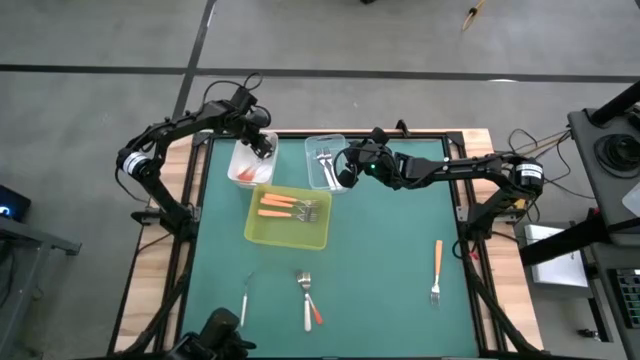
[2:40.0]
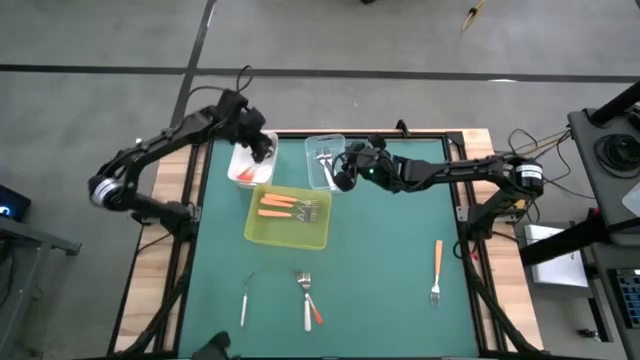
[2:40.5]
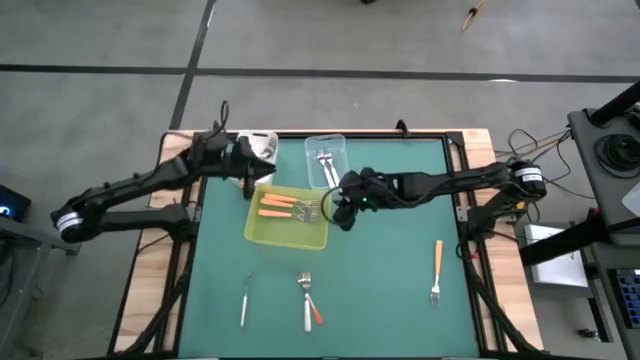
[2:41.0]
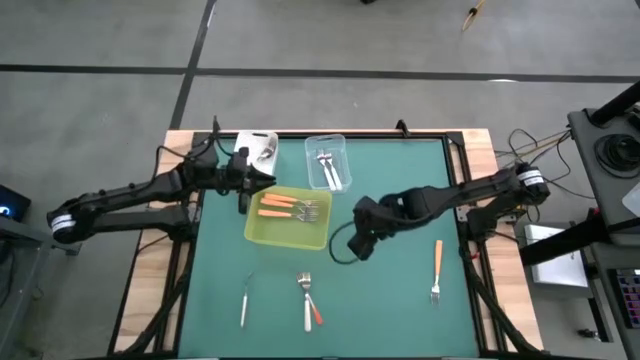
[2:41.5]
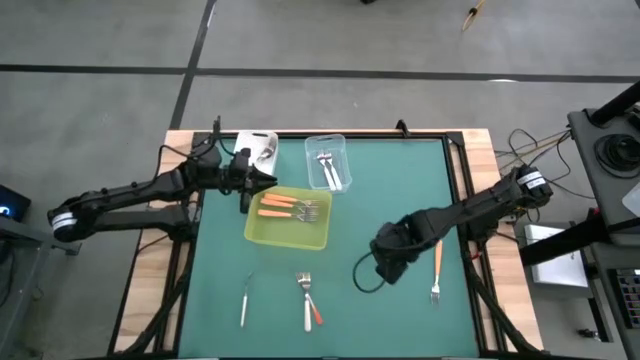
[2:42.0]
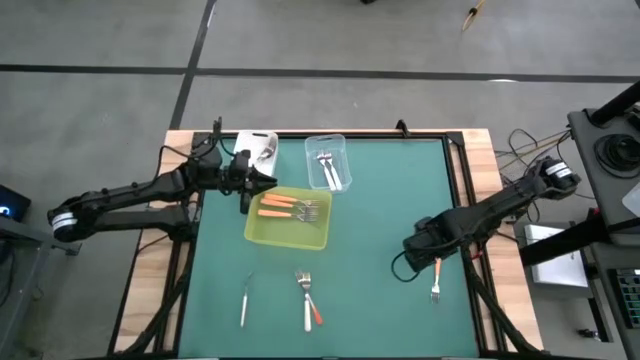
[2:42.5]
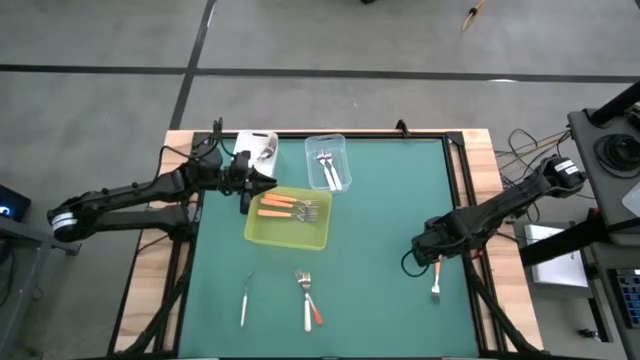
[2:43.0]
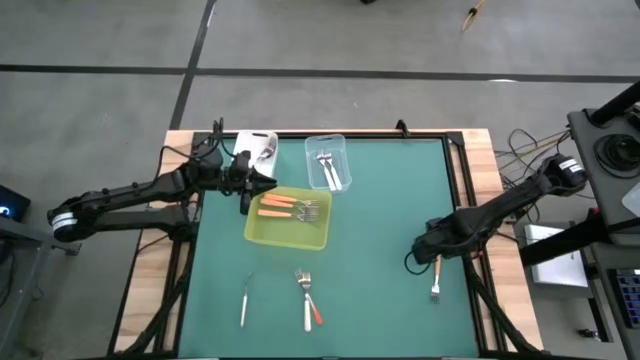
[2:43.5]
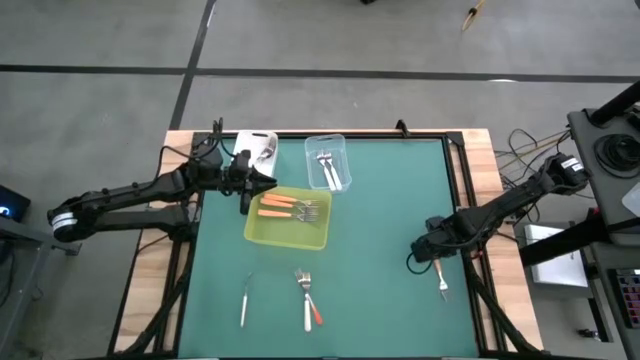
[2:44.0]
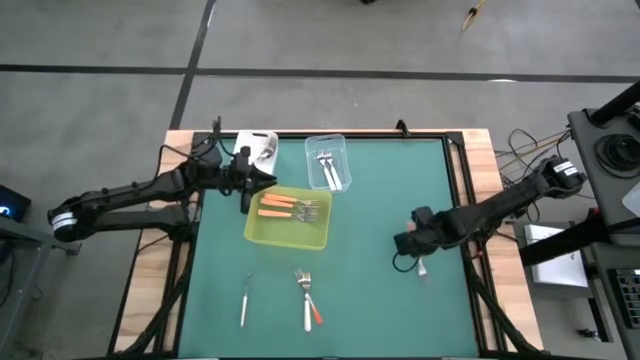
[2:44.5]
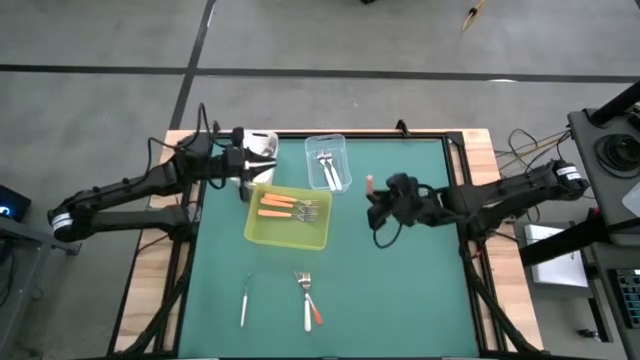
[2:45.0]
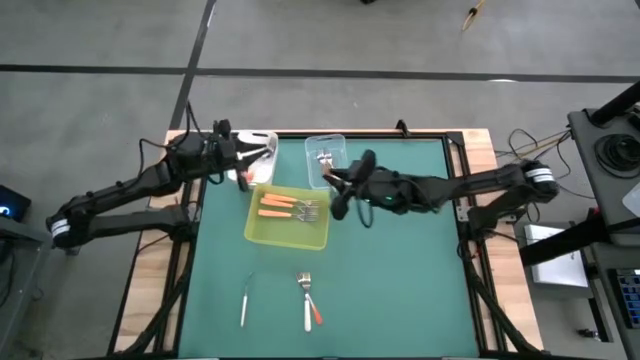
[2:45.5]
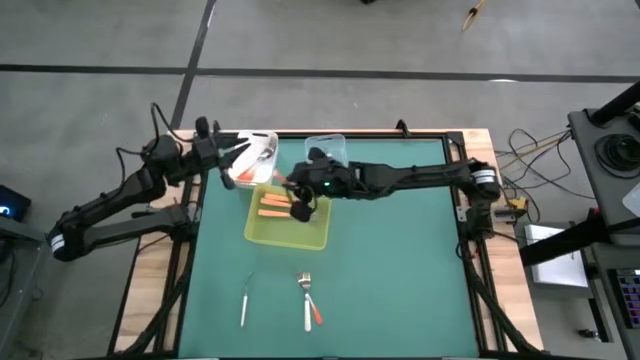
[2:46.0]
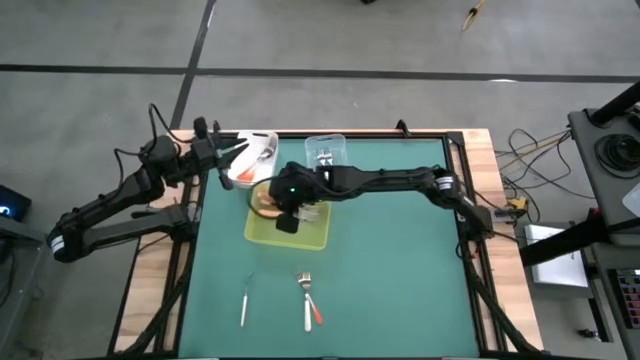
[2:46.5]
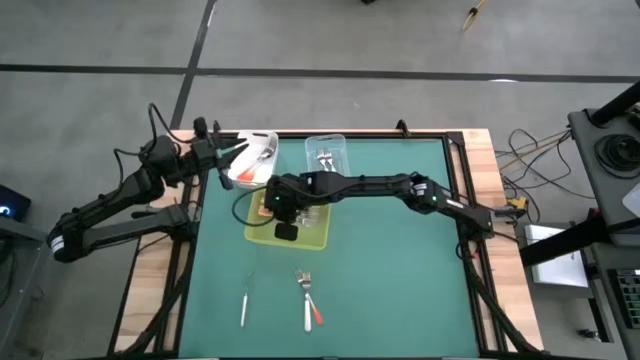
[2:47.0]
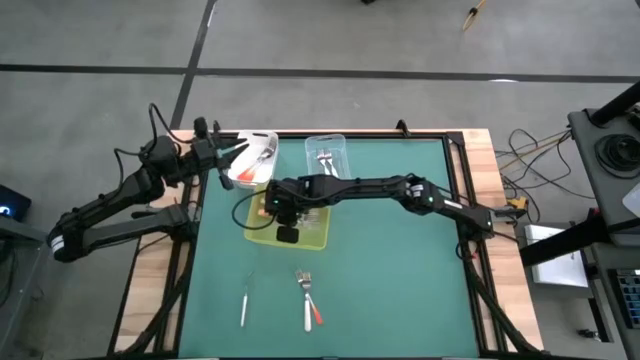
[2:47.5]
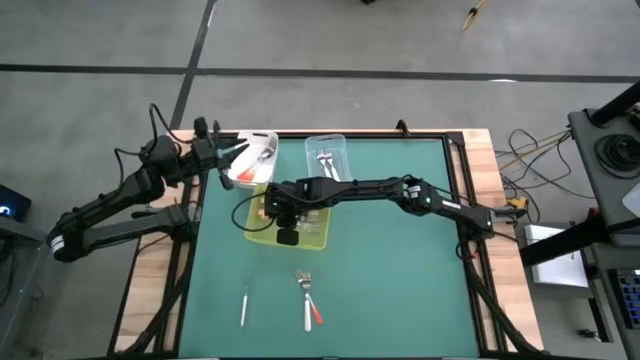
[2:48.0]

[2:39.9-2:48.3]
Task: Sort silverware by color (type)
Put the yellow fork into the yellow bin

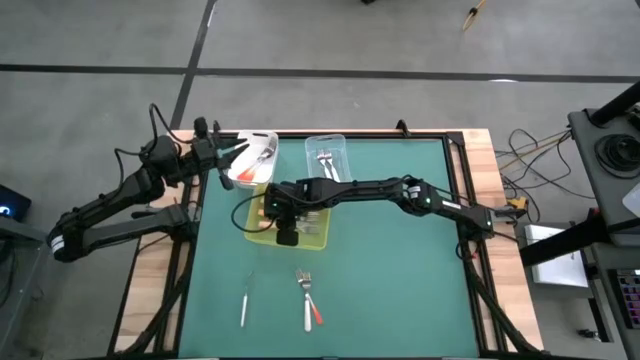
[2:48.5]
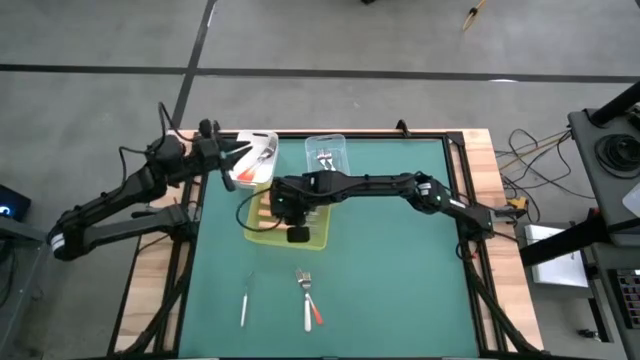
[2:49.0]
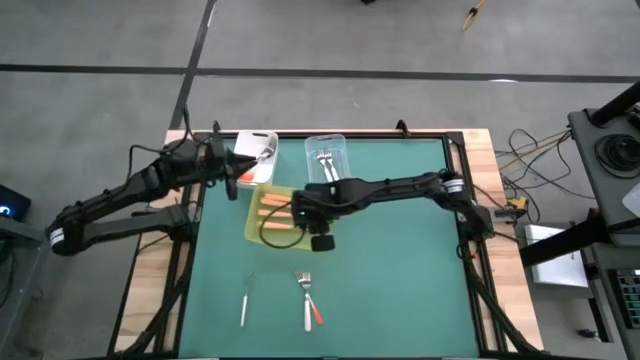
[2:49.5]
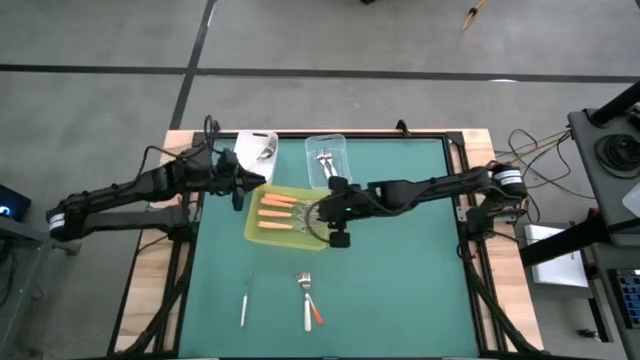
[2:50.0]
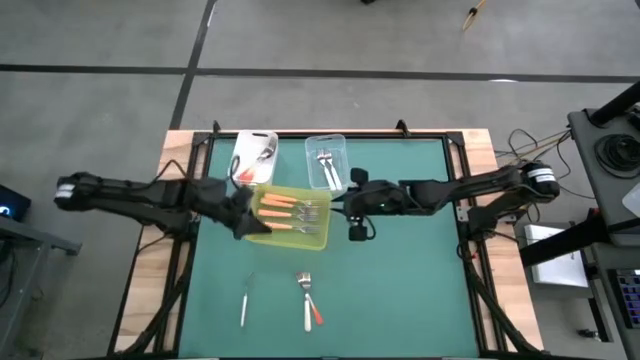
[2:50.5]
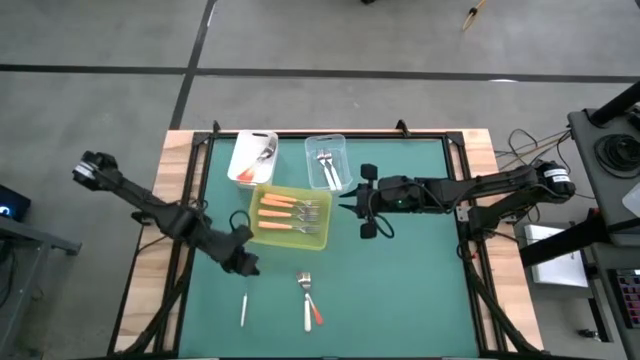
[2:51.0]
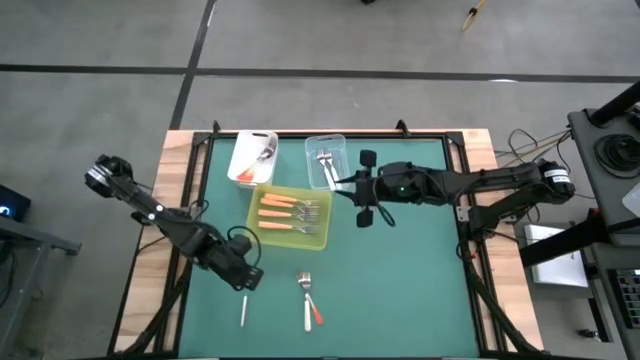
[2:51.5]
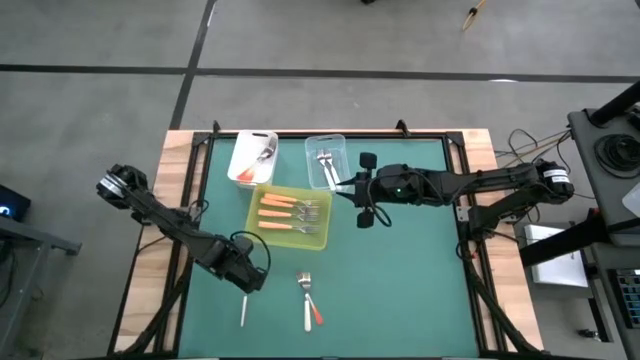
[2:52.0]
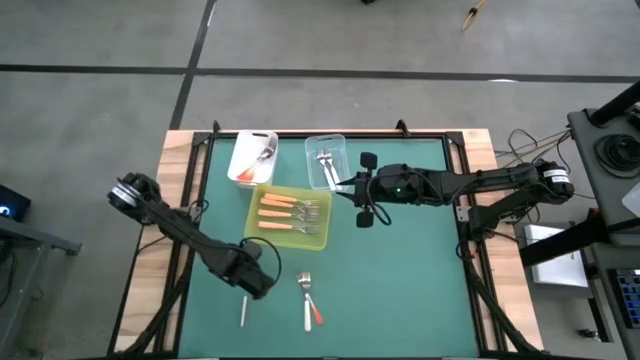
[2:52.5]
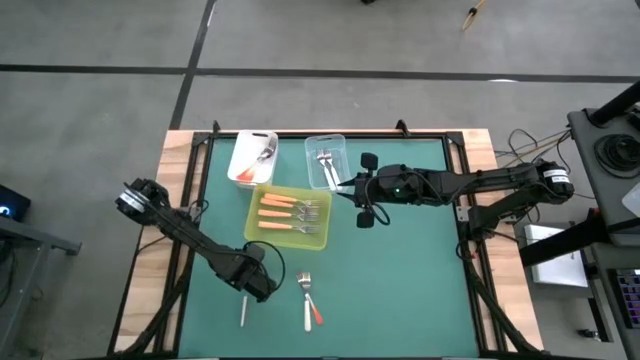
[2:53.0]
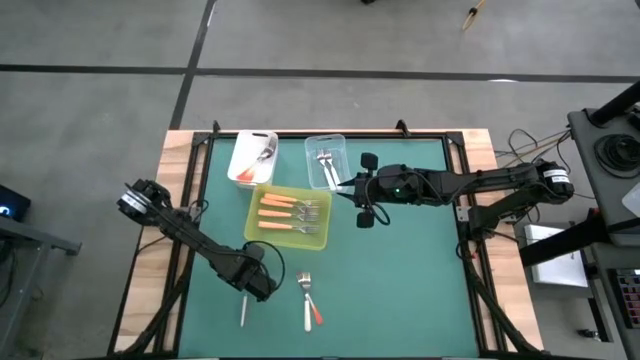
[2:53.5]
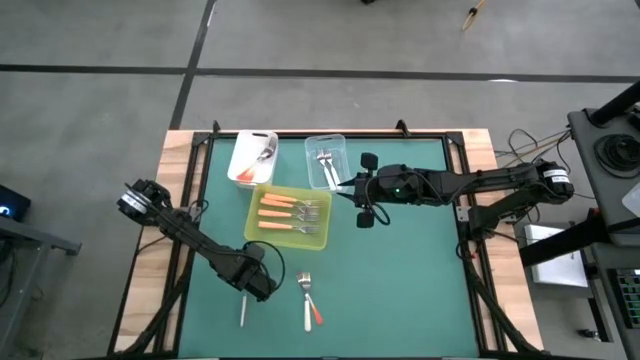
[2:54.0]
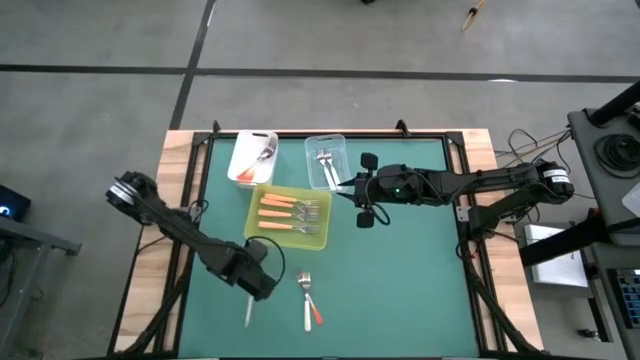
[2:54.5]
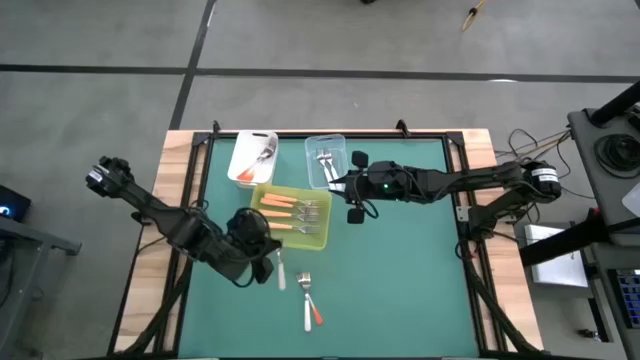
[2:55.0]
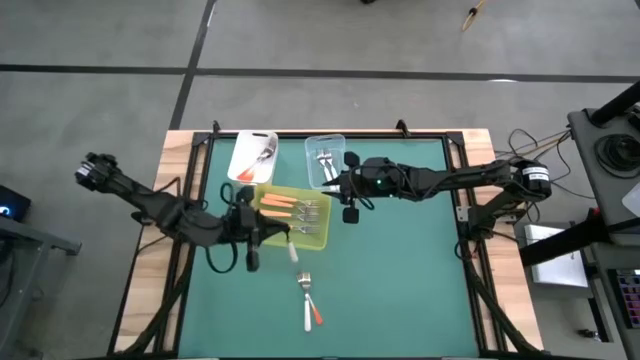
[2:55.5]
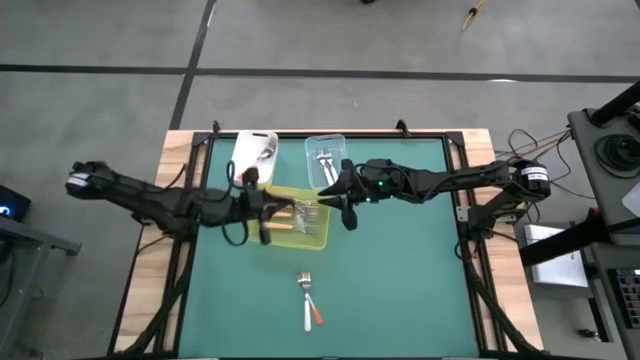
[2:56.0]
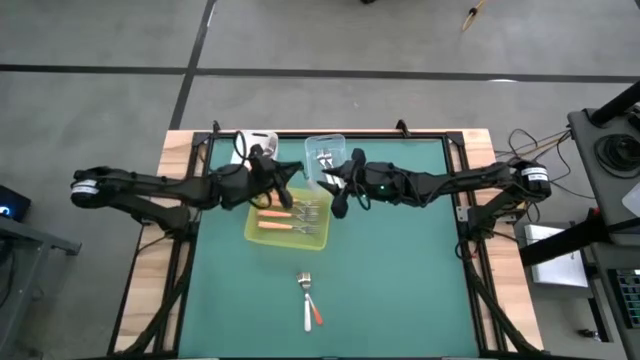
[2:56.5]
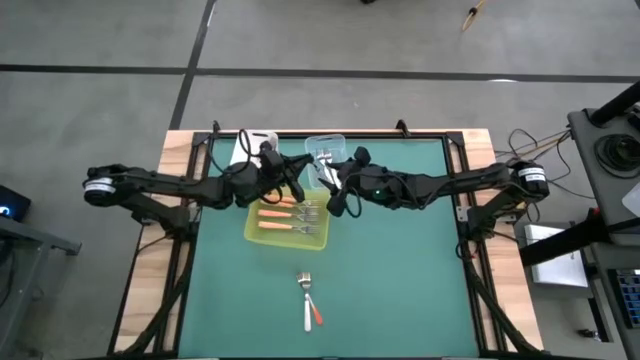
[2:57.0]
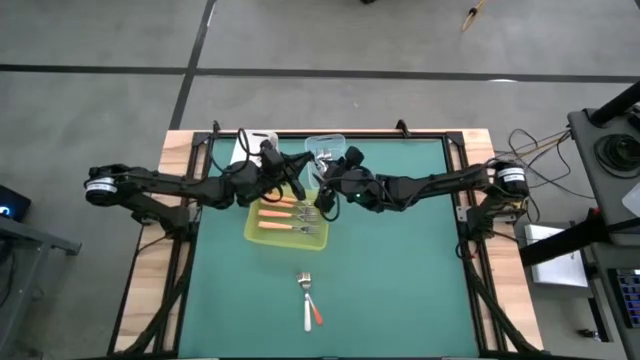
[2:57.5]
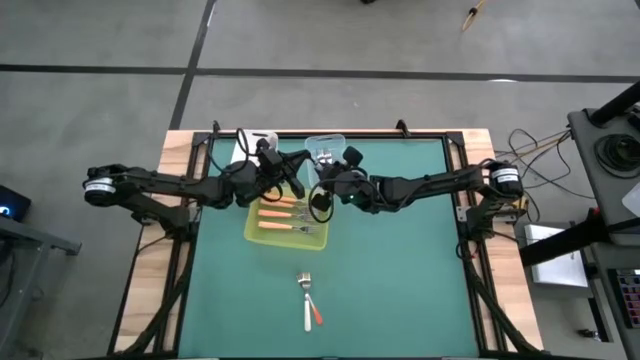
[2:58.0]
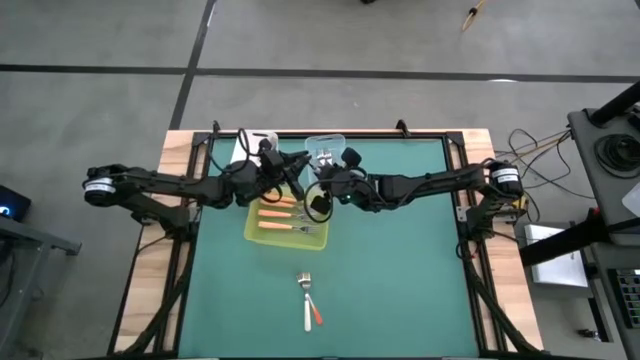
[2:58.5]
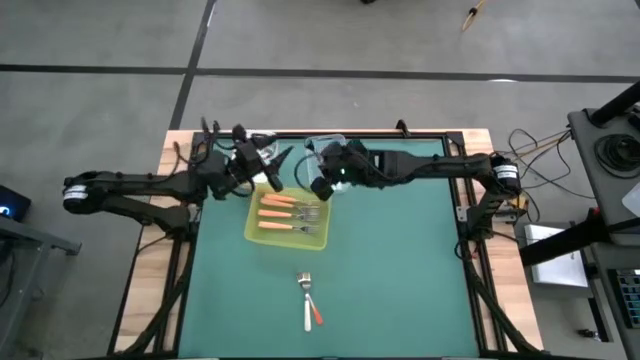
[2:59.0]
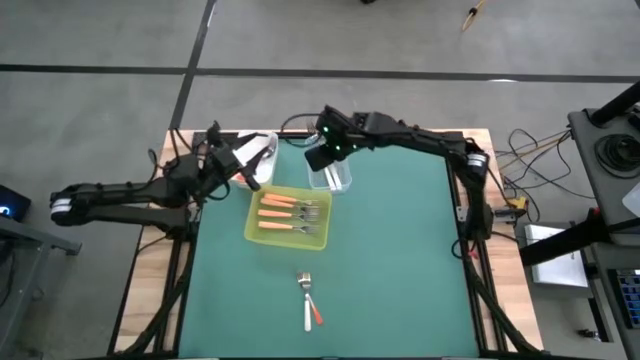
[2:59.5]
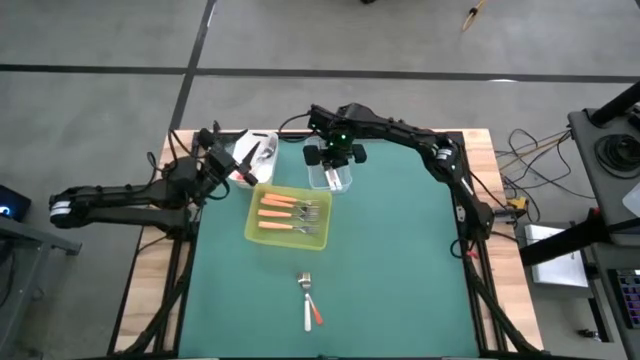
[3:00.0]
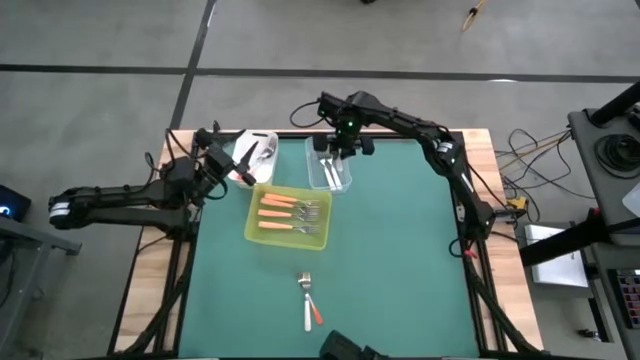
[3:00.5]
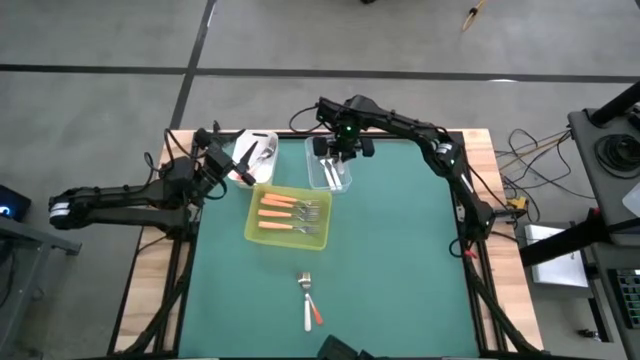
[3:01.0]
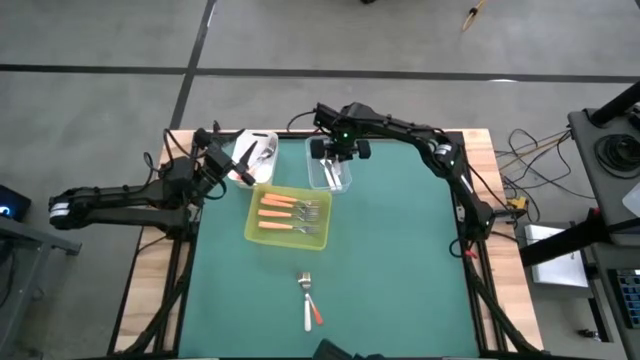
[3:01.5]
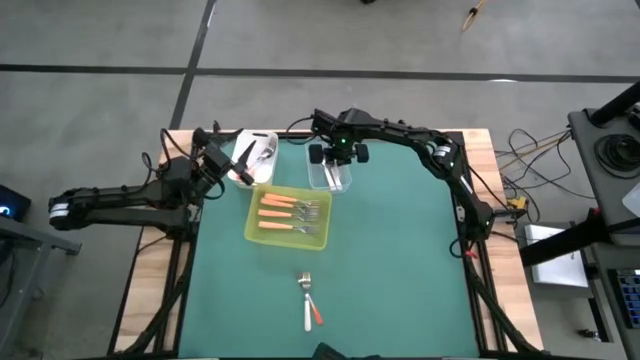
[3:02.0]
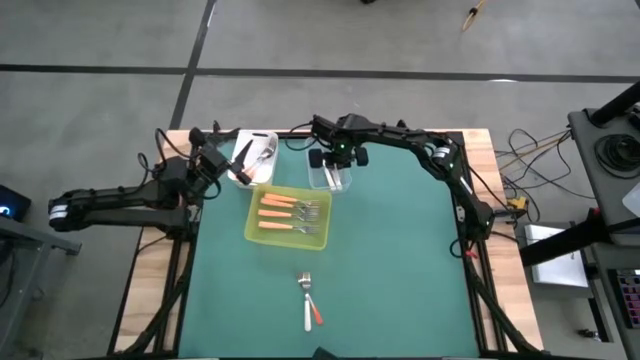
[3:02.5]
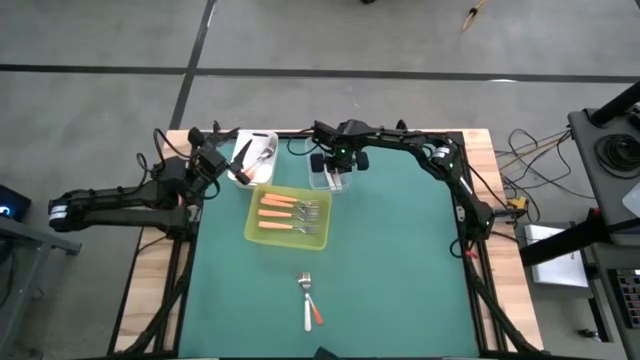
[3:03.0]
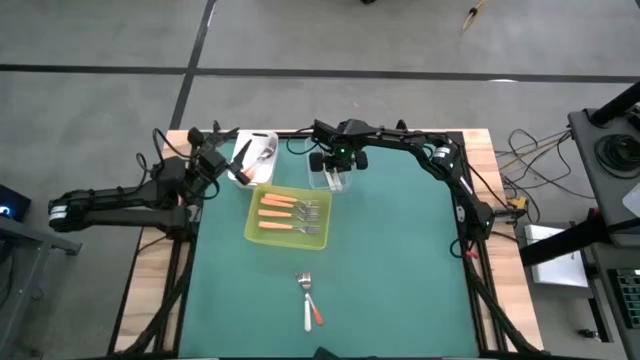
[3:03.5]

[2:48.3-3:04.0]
Put the white fork into the transparent bin
